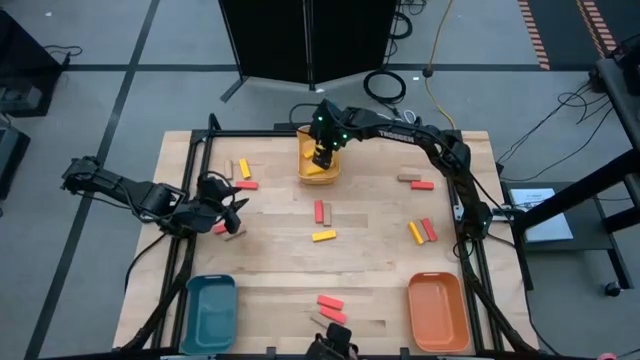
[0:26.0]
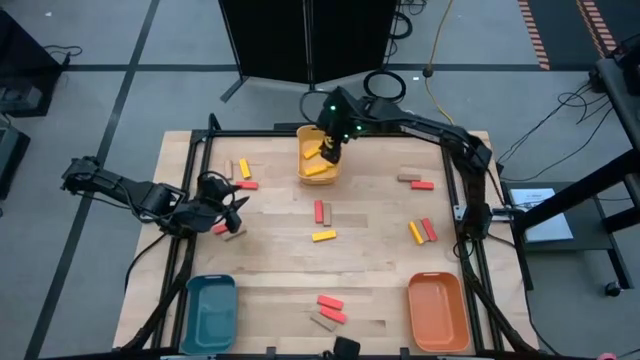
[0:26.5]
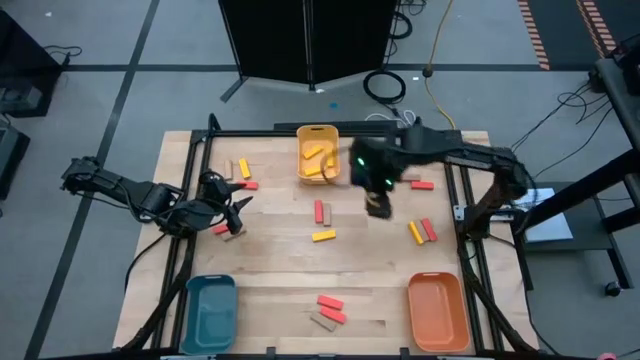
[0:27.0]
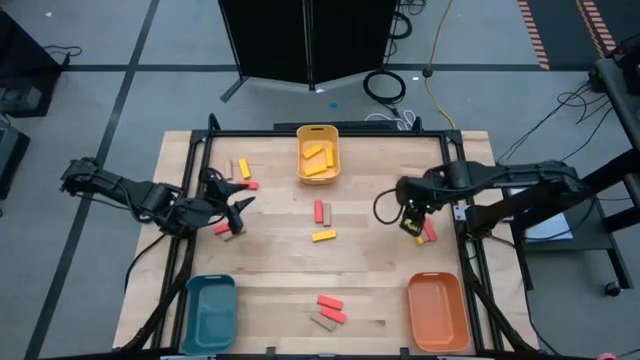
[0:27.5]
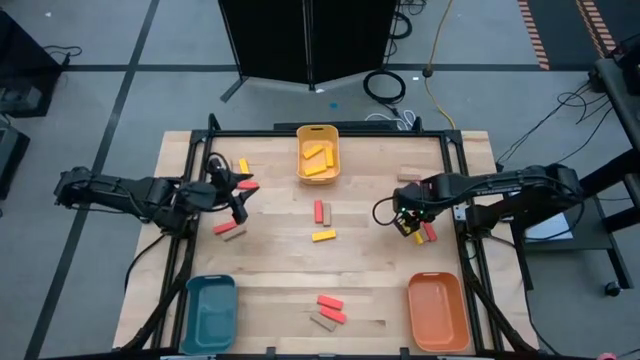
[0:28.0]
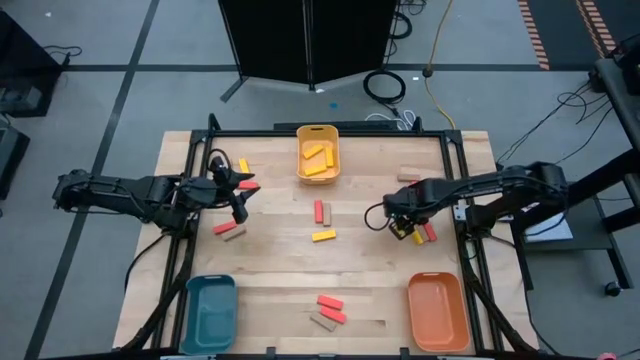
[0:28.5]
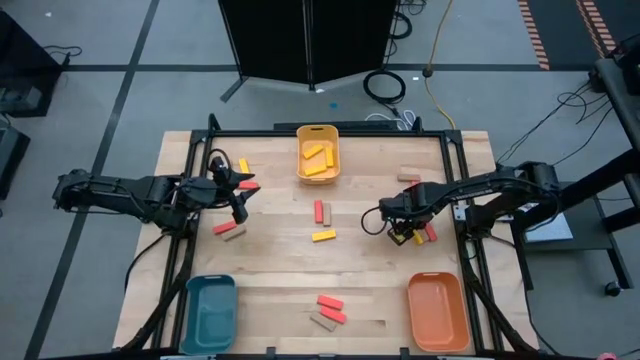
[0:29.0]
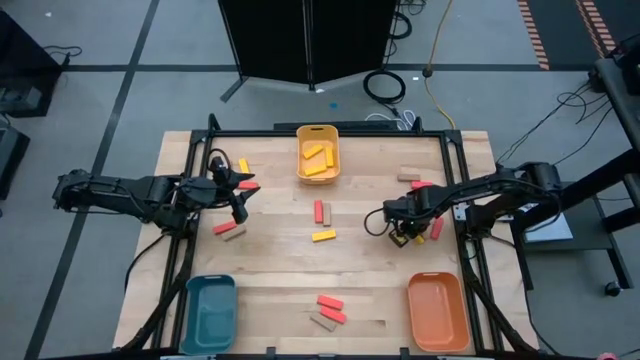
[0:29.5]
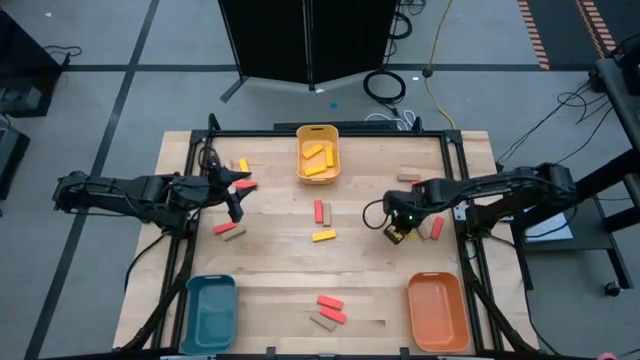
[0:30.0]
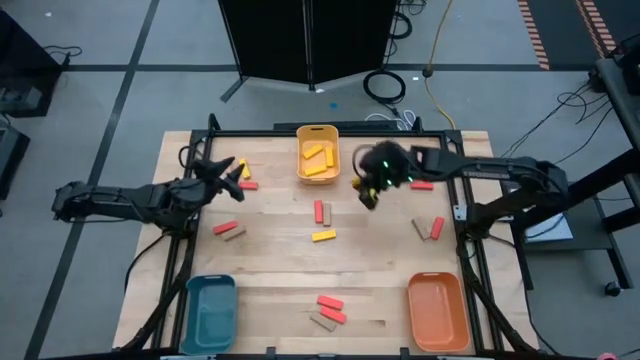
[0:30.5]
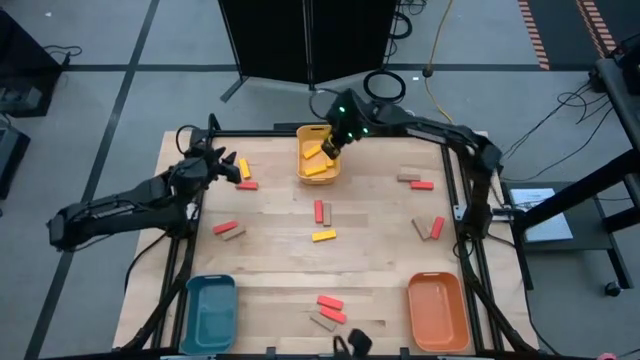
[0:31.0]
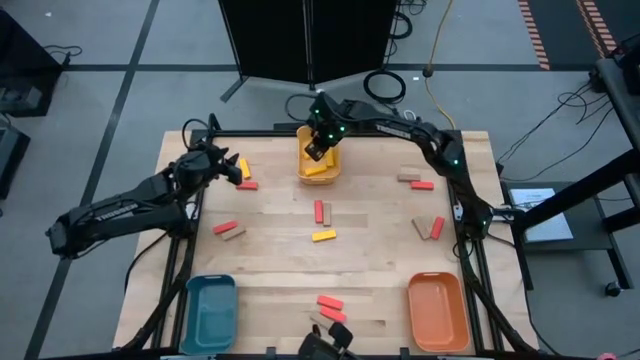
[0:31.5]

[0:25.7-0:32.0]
Task: Sort blocks
Put the yellow block into the yellow bin

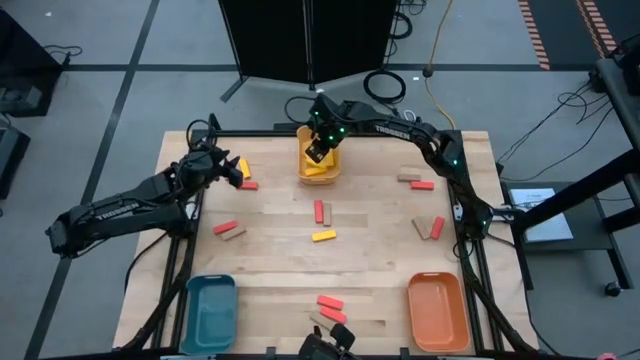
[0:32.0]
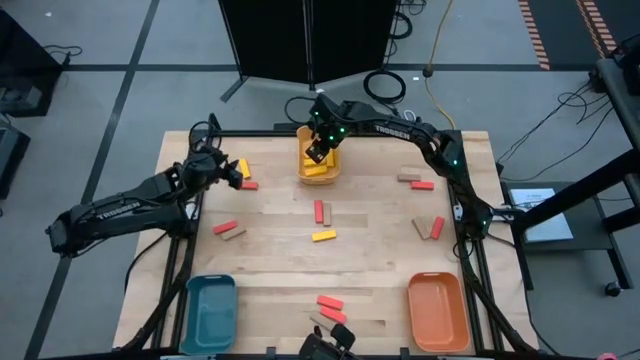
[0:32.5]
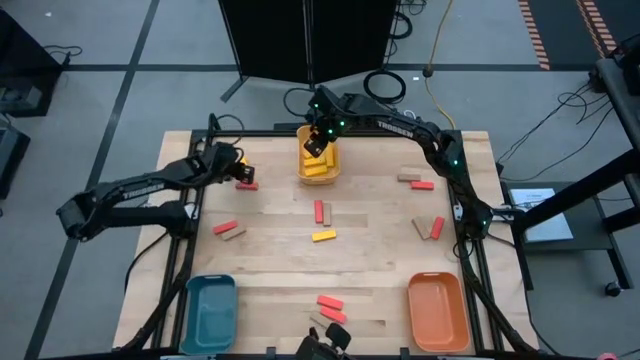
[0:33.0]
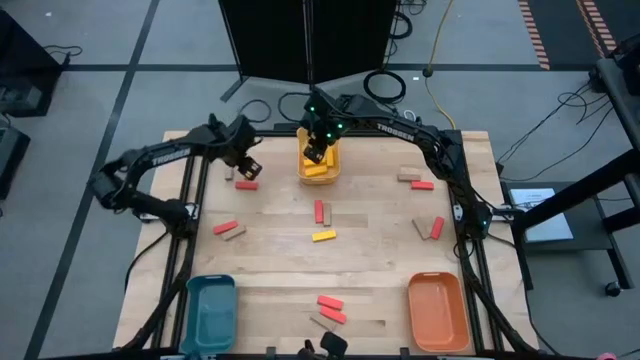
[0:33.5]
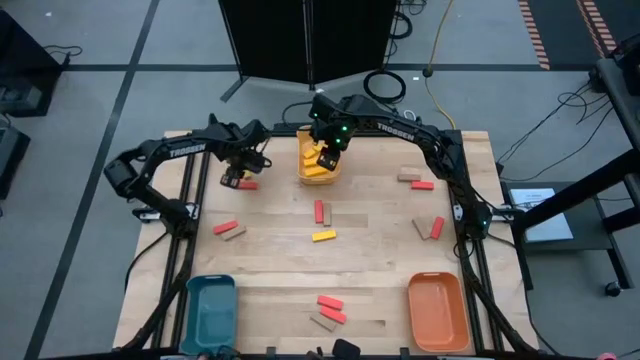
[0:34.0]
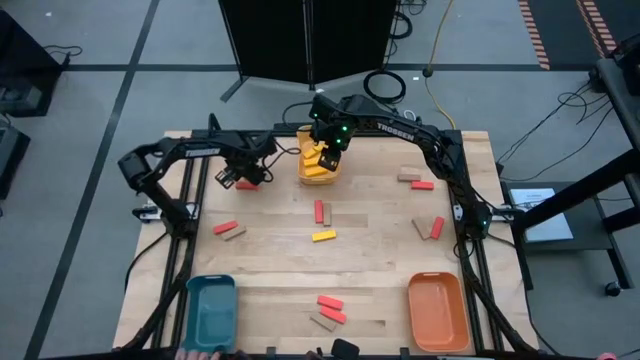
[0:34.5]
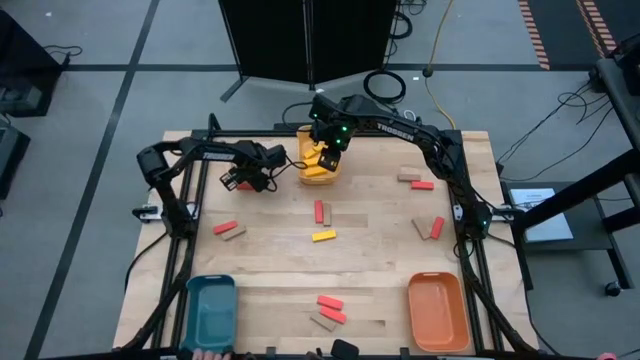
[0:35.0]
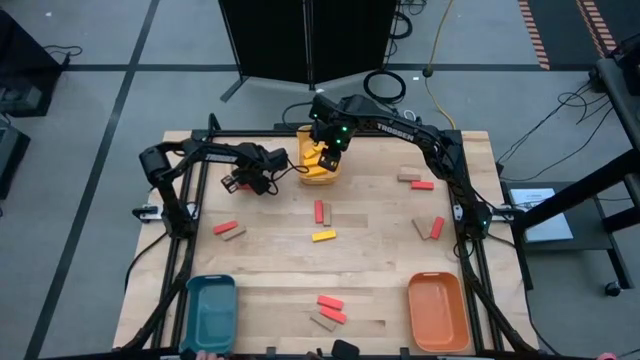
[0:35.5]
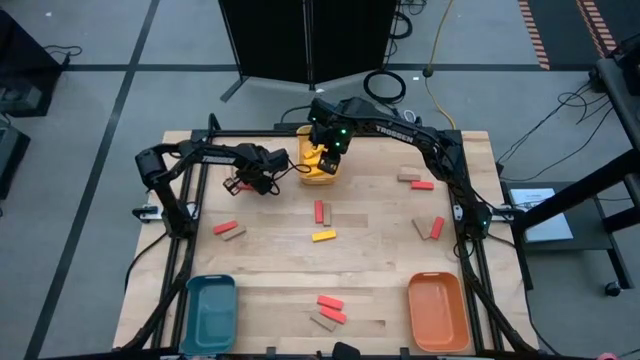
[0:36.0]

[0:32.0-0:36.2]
Put the yellow block into the yellow bin

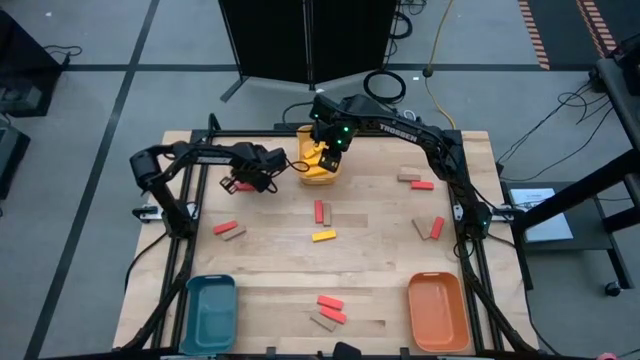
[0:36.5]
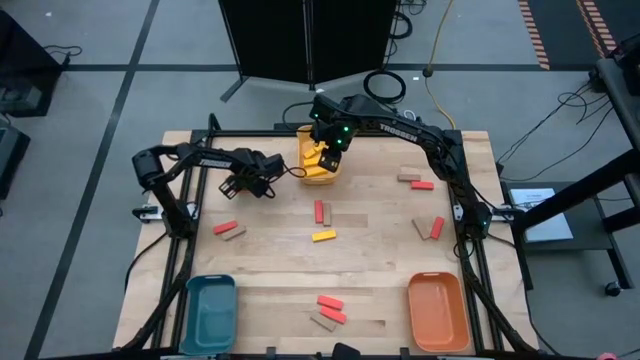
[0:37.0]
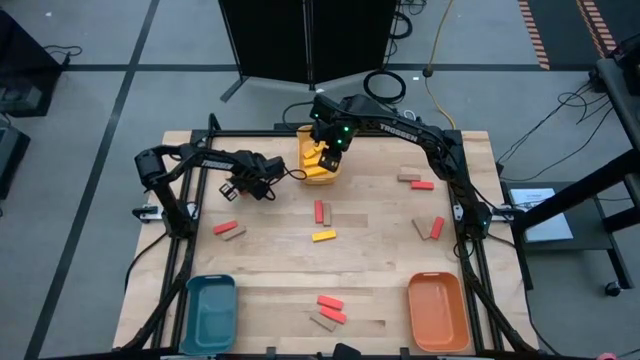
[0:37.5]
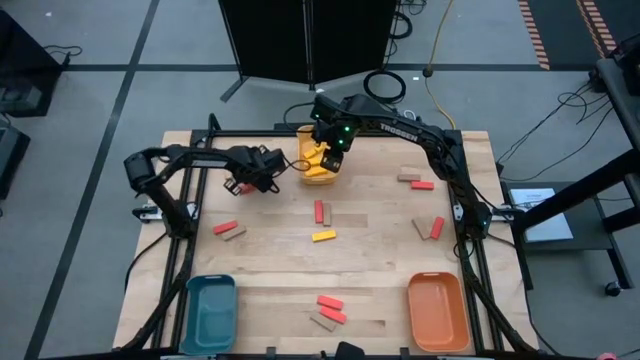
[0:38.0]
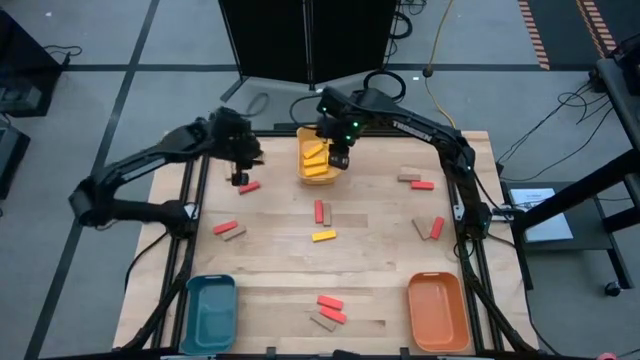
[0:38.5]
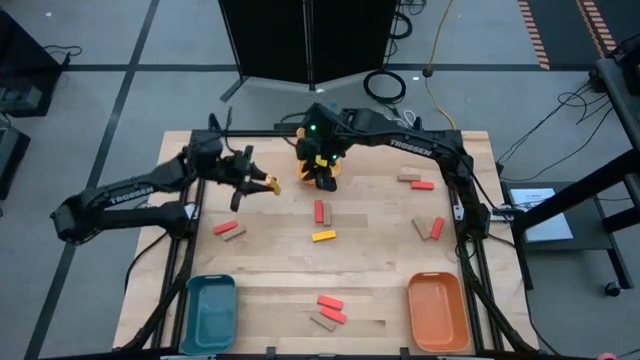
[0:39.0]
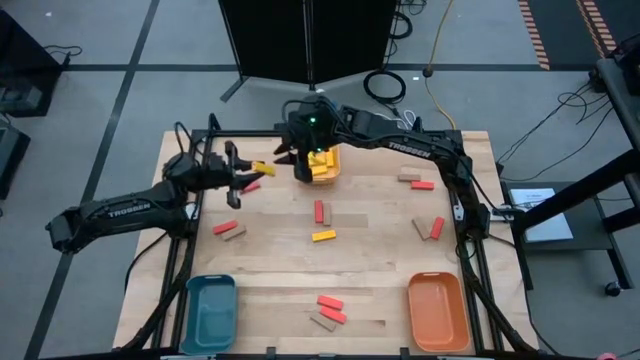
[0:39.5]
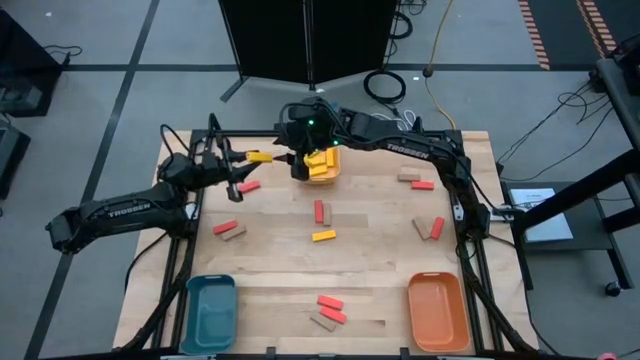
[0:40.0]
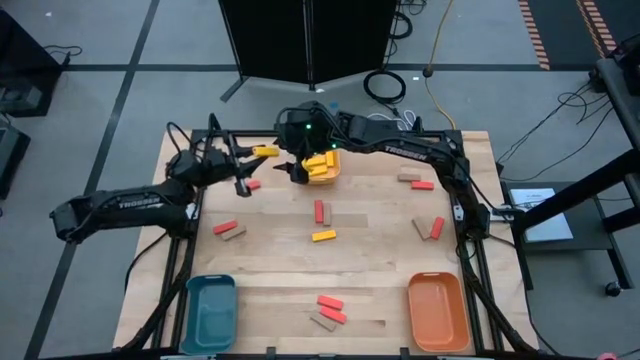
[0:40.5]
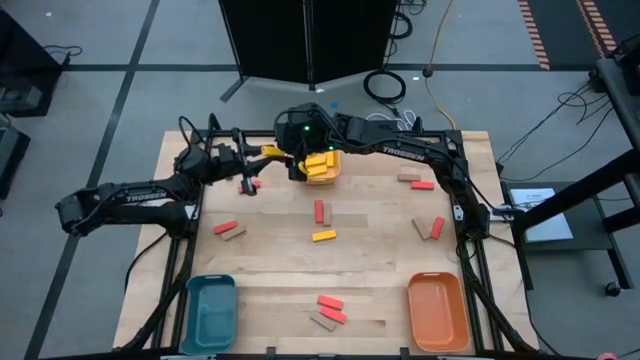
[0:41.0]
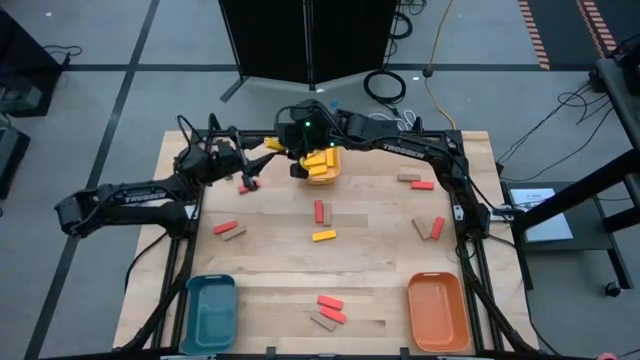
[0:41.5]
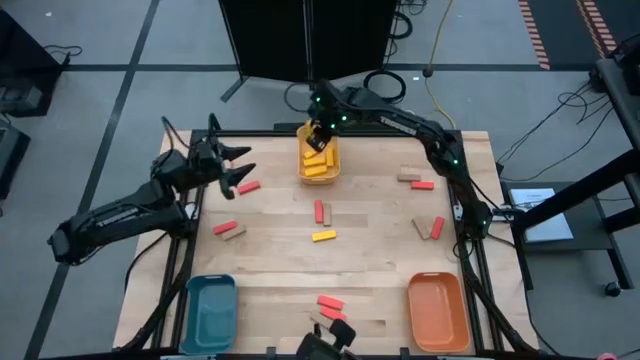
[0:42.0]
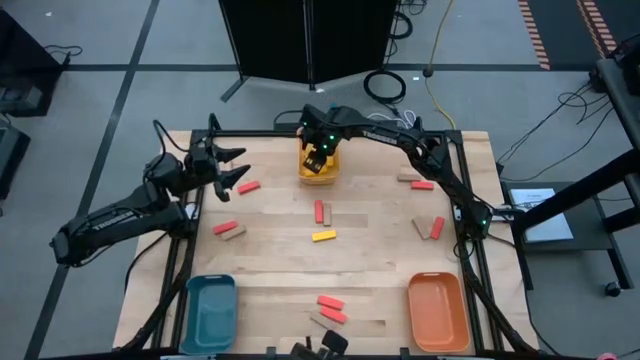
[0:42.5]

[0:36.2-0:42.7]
Put the yellow block into the yellow bin

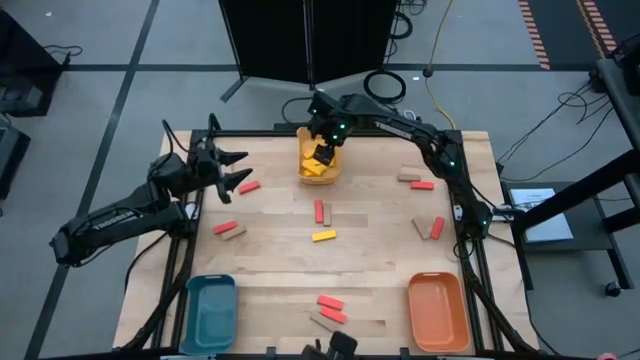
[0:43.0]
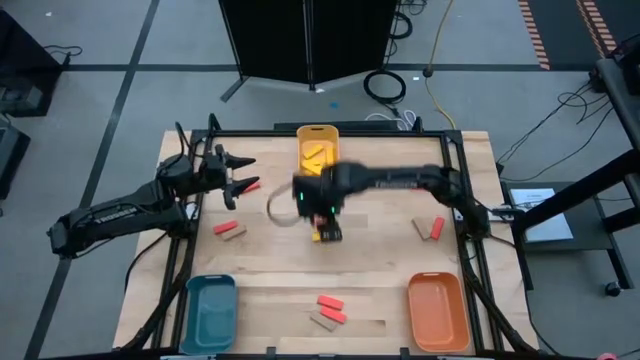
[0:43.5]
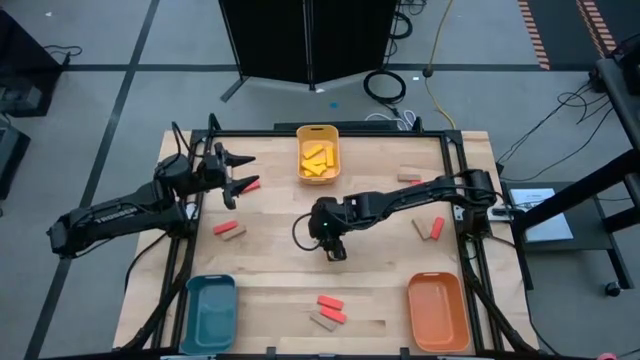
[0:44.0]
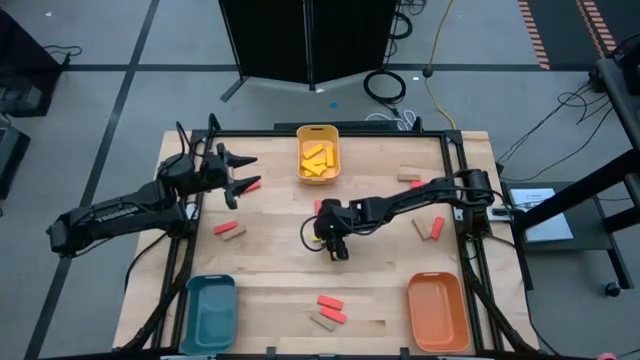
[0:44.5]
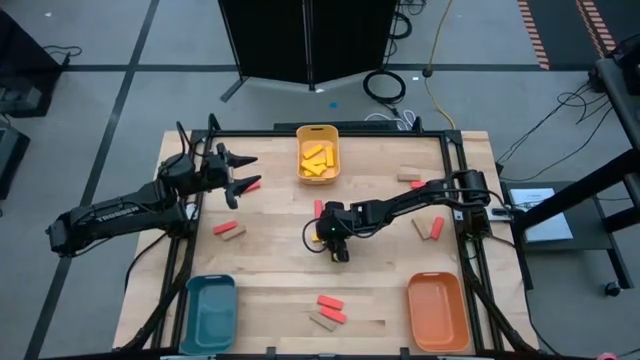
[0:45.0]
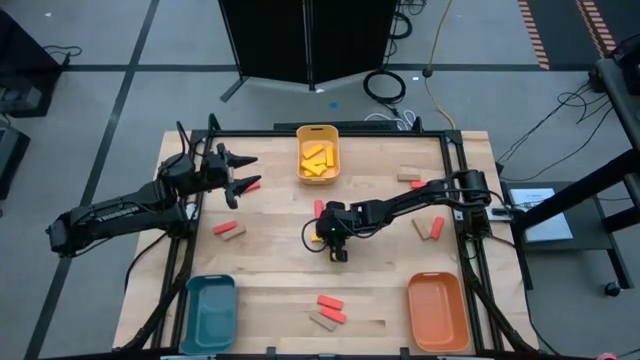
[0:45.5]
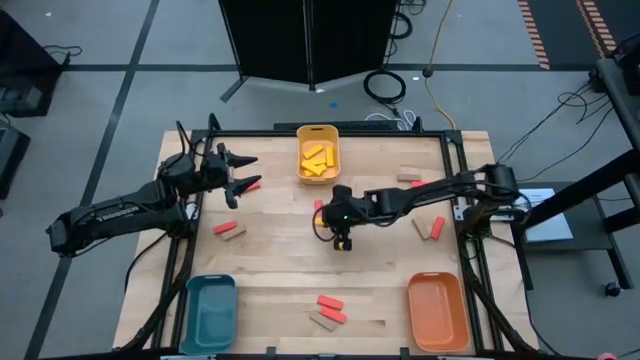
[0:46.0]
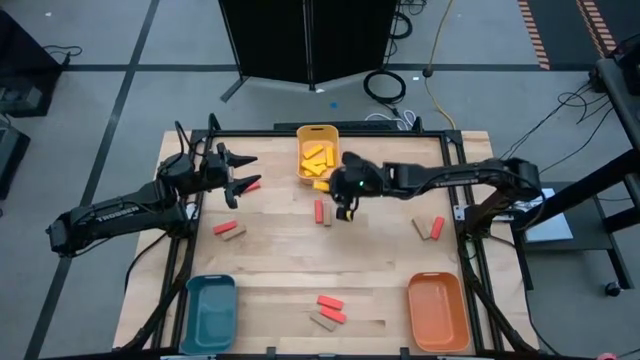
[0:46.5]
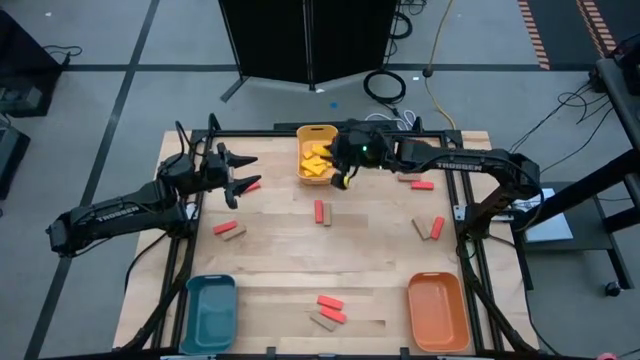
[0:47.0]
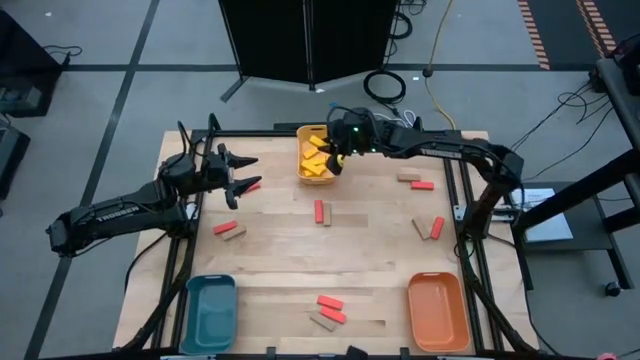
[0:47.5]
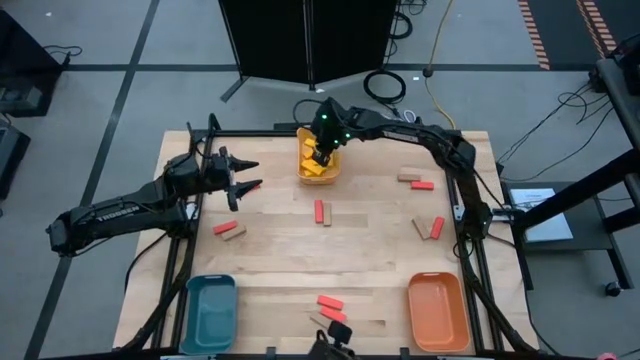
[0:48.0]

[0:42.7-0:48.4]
Put the yellow block into the yellow bin
